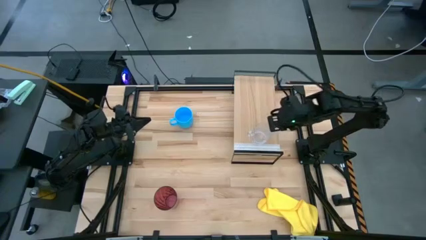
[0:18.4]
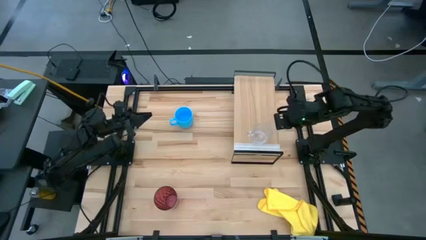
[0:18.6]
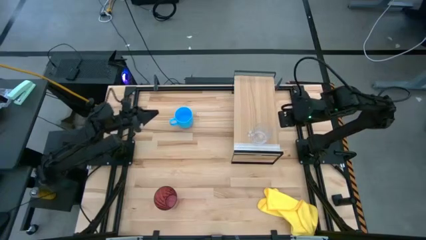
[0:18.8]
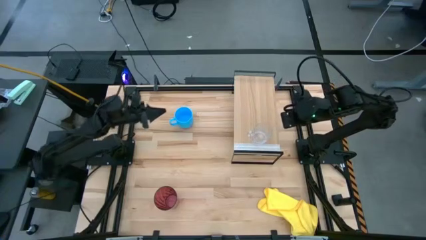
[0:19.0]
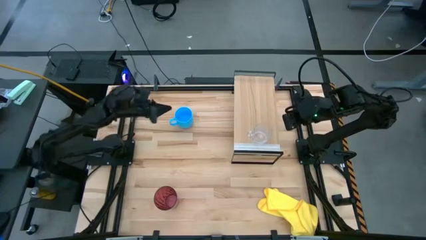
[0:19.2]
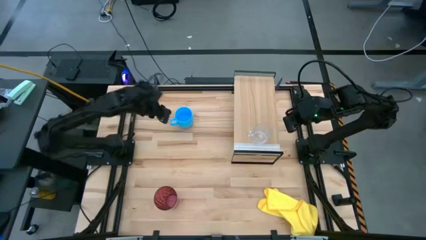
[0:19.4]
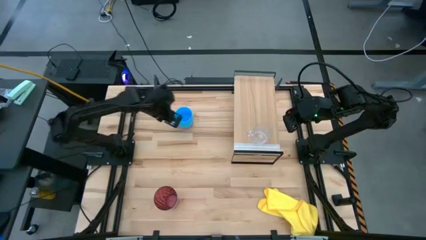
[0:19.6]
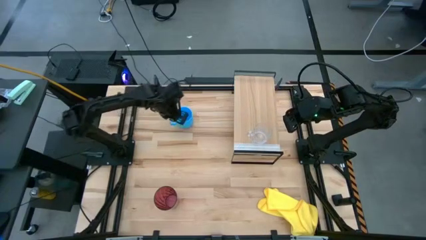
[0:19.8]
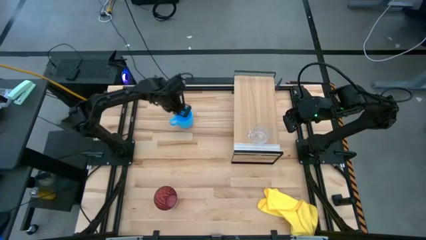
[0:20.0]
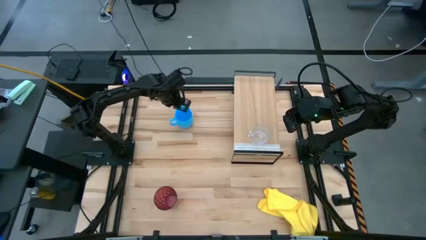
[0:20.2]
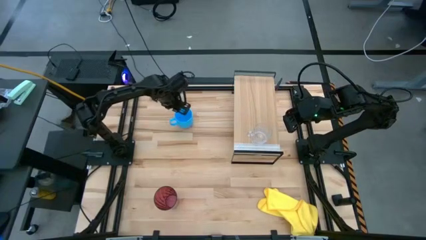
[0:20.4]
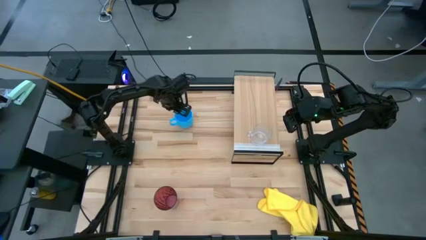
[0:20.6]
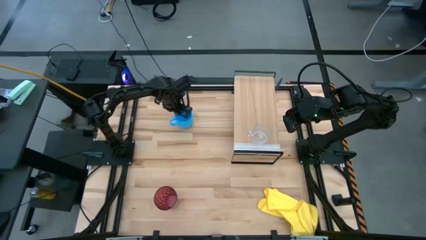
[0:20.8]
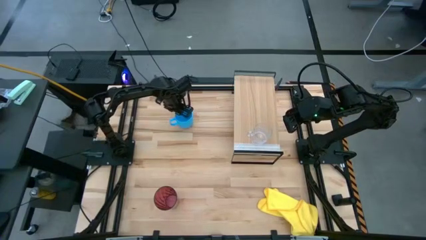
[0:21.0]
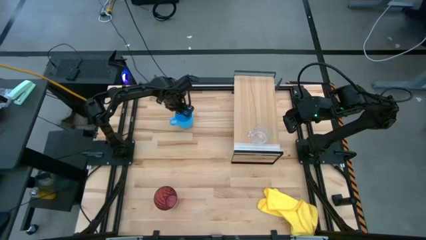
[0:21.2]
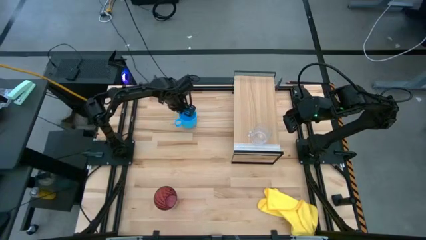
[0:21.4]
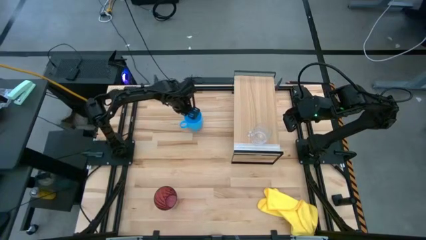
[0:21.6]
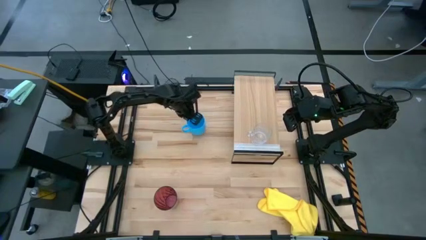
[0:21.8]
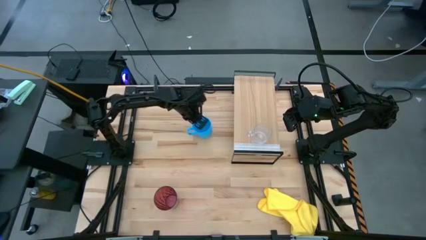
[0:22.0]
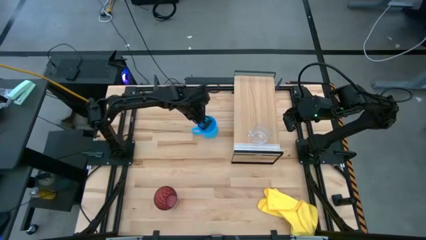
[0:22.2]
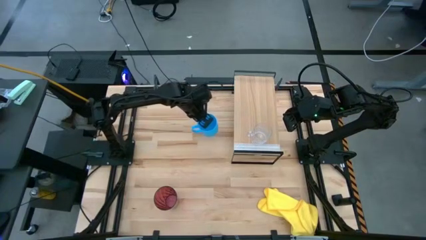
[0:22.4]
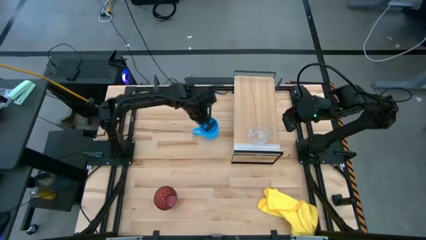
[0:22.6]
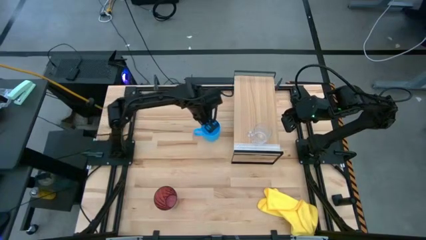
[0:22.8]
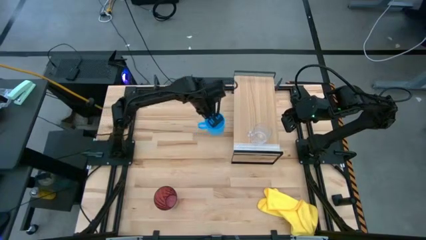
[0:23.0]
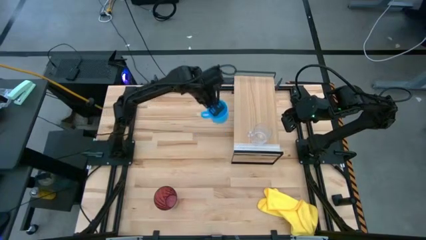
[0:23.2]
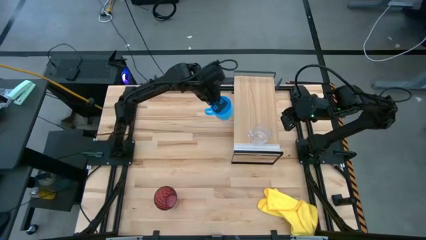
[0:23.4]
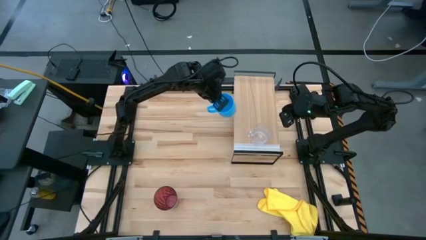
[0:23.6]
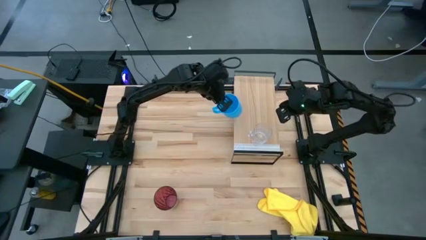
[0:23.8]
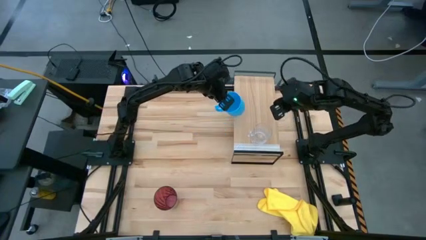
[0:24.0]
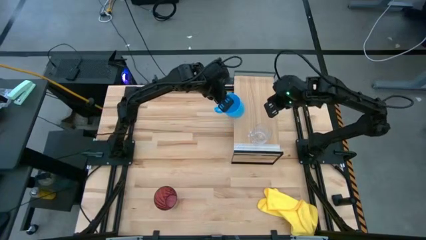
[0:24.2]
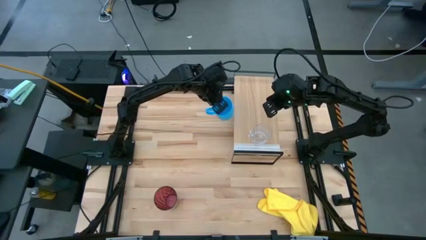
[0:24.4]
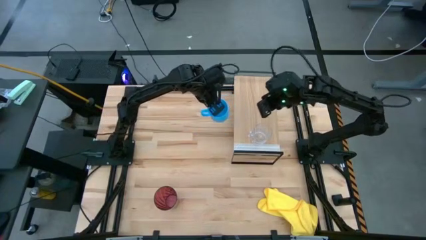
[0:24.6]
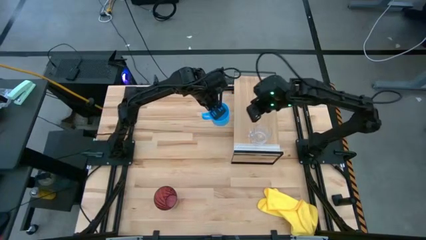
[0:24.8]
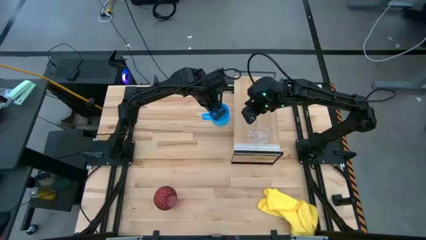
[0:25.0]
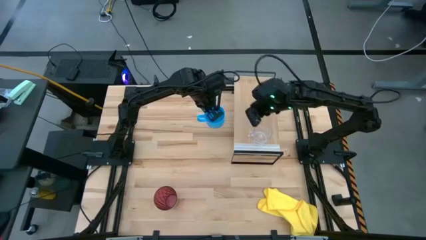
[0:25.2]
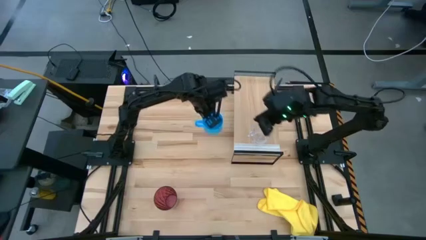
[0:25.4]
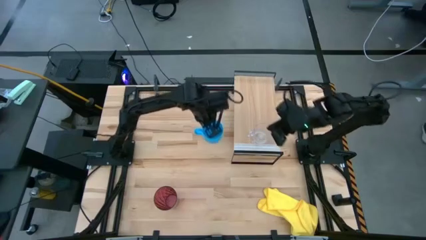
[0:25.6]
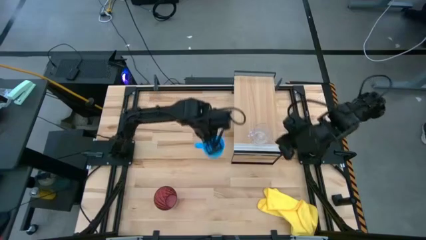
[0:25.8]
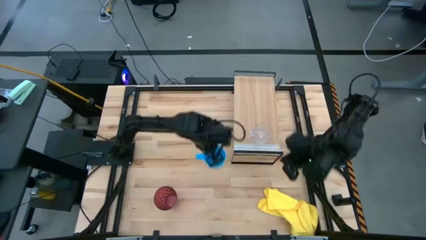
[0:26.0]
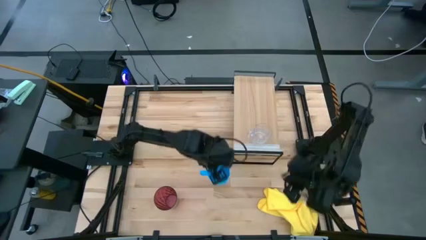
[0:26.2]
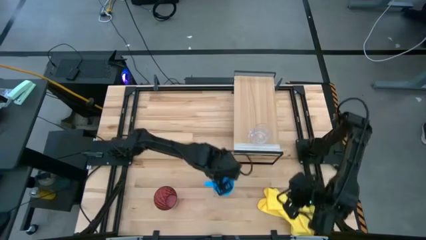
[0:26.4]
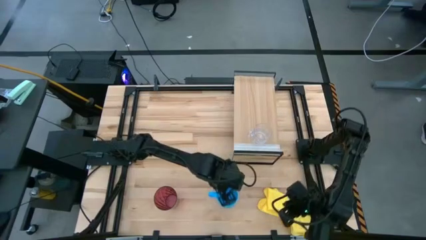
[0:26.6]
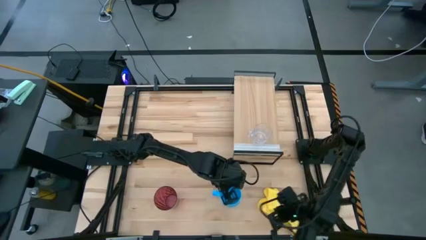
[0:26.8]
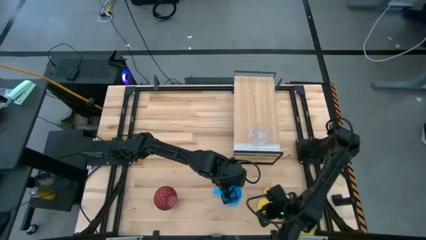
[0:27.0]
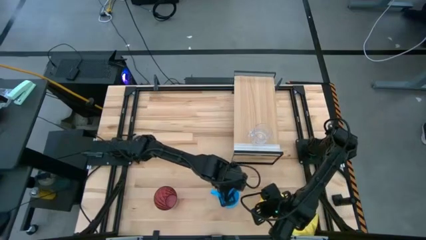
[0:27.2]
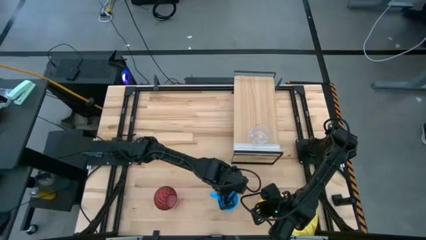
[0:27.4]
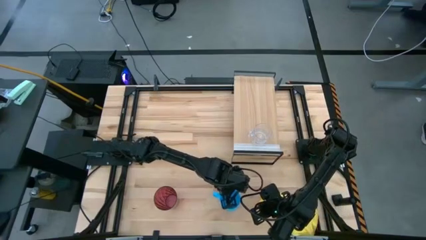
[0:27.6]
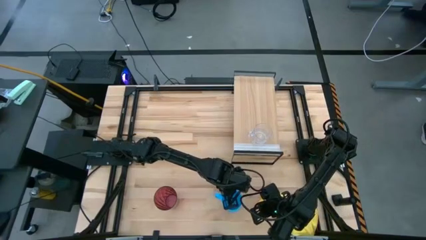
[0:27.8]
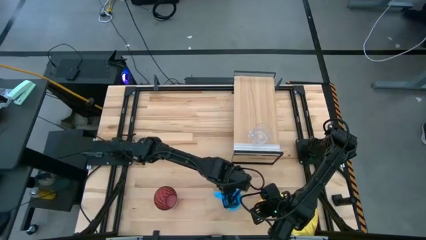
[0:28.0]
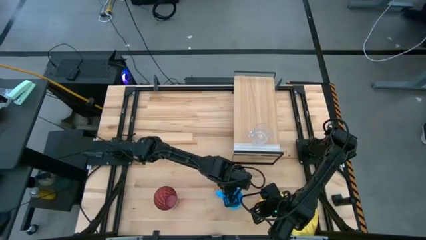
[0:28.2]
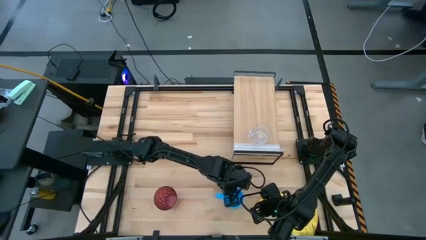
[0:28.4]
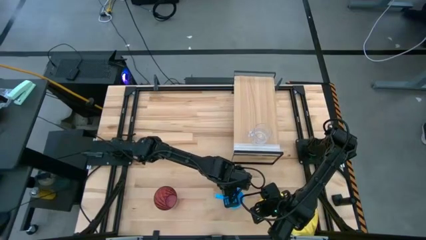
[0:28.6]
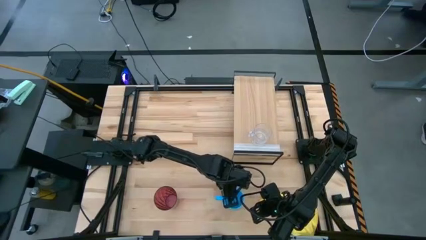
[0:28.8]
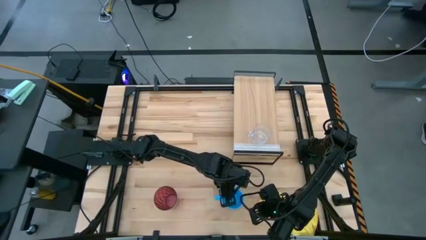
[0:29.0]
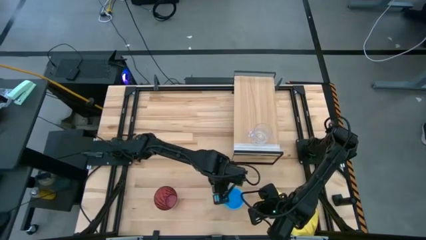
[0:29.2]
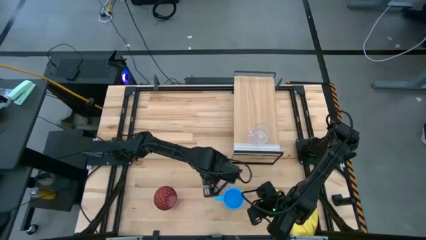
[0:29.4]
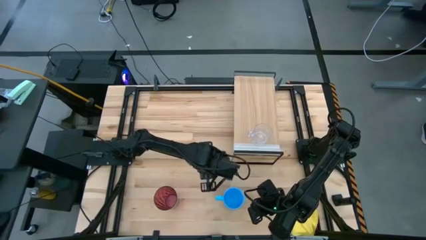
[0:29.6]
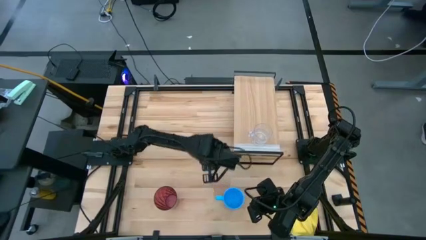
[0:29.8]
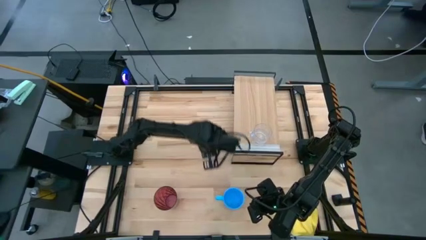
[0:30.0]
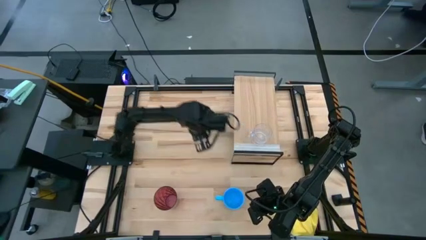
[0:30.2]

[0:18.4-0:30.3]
Task: Stack small to large cups/mugs on shelf
Put the blue cup on the shelf
